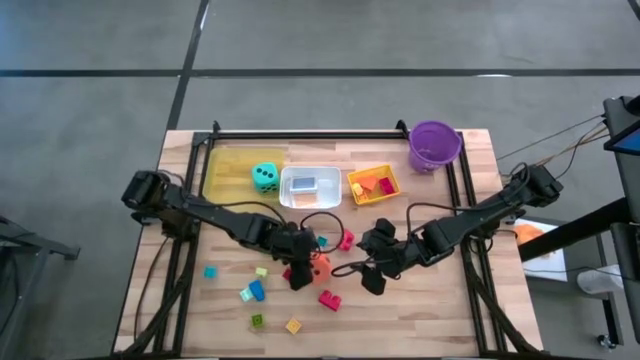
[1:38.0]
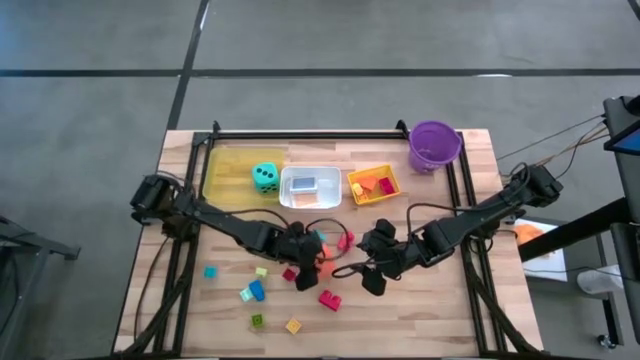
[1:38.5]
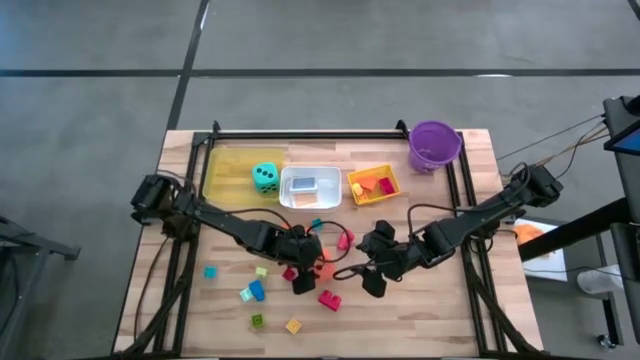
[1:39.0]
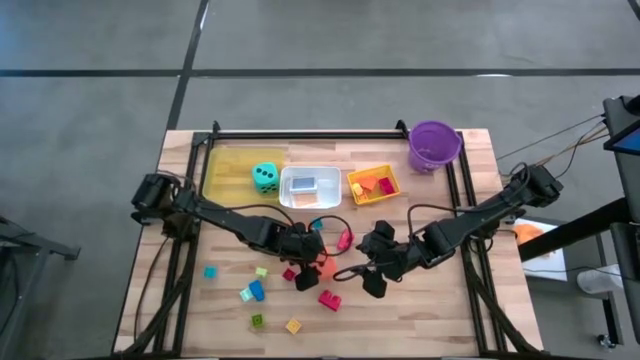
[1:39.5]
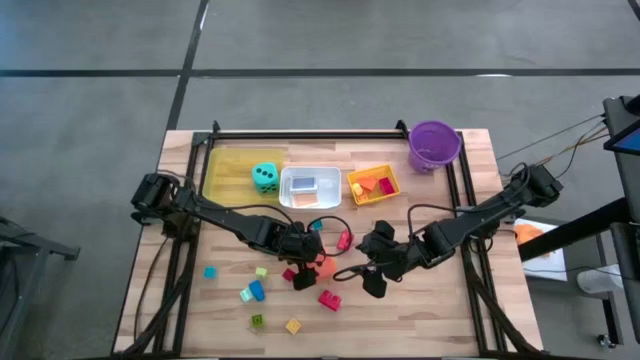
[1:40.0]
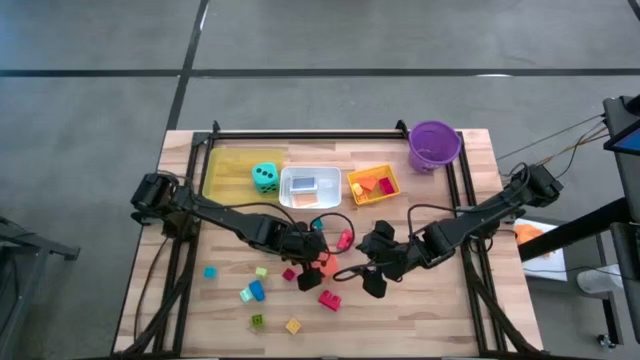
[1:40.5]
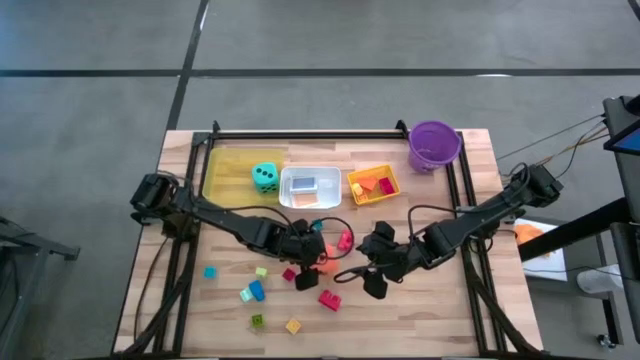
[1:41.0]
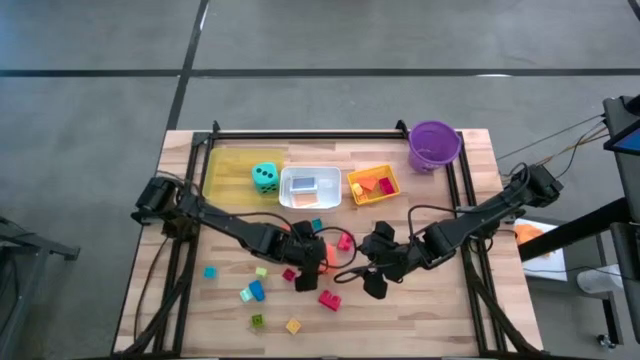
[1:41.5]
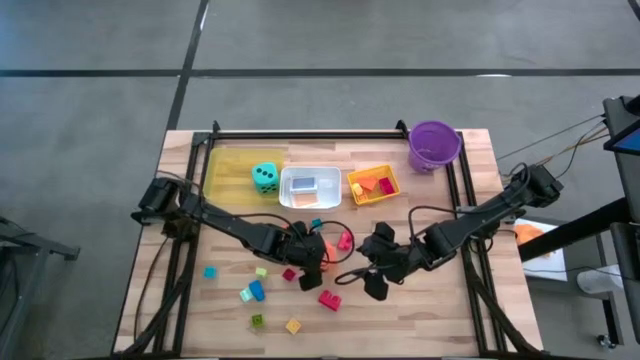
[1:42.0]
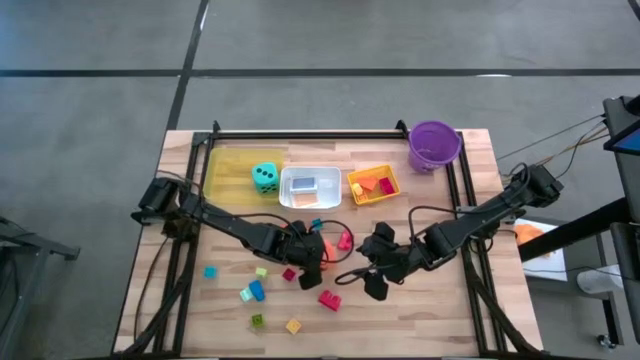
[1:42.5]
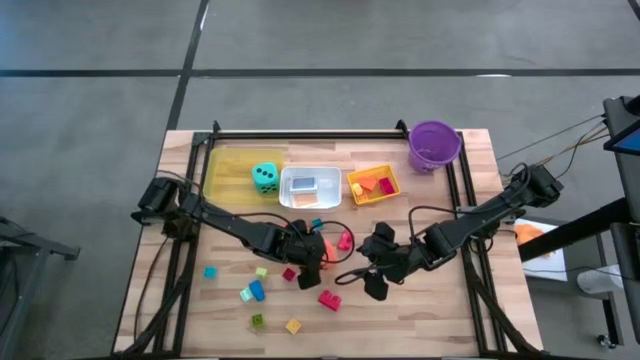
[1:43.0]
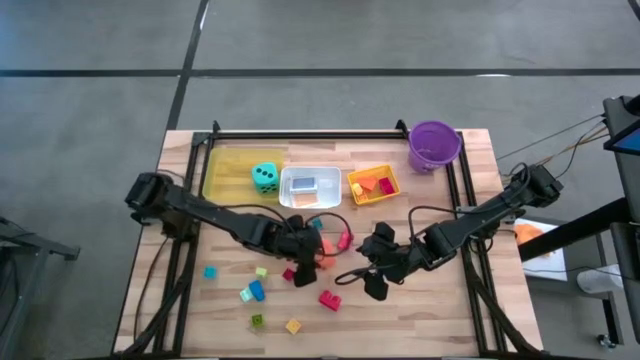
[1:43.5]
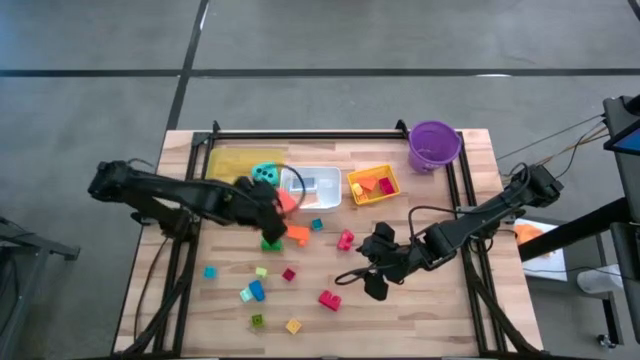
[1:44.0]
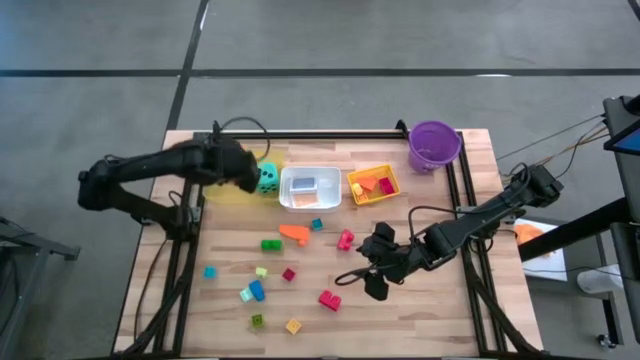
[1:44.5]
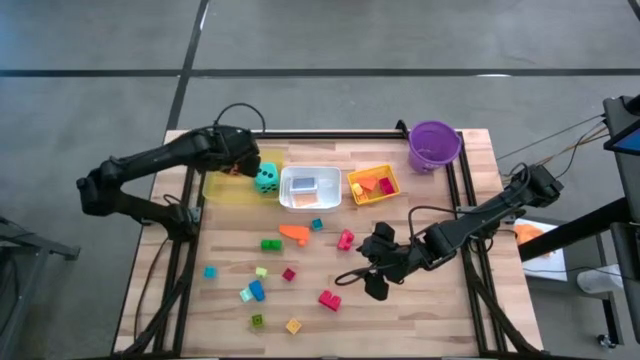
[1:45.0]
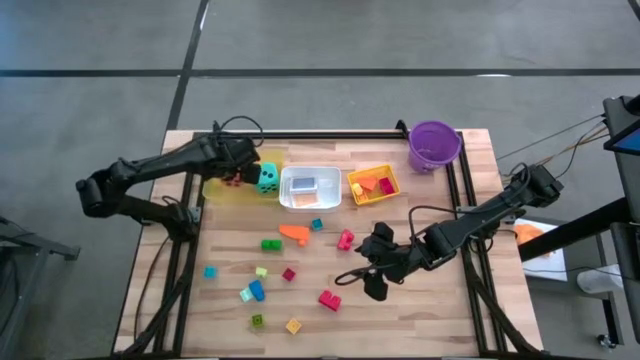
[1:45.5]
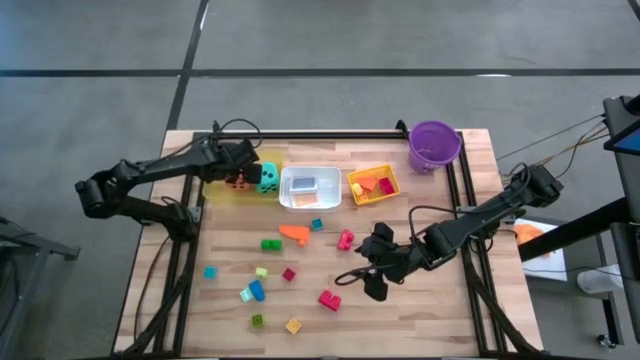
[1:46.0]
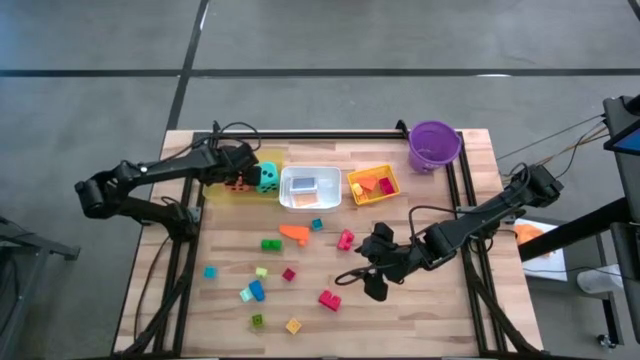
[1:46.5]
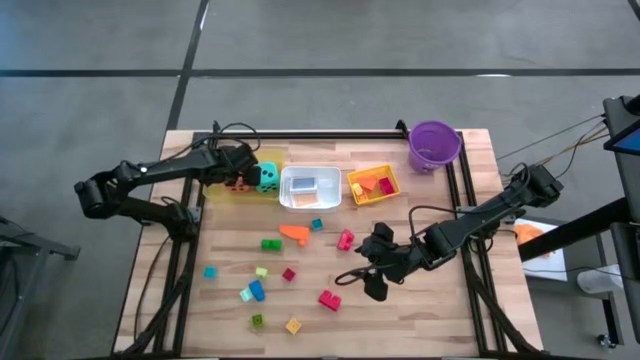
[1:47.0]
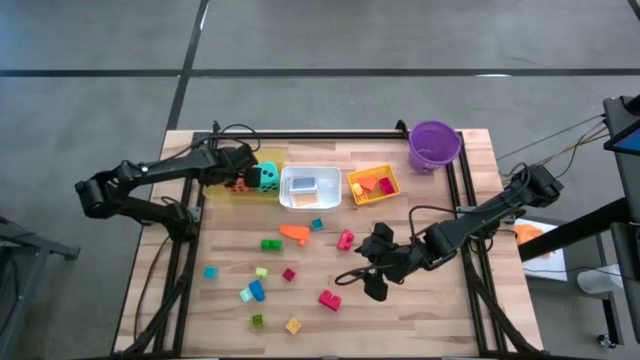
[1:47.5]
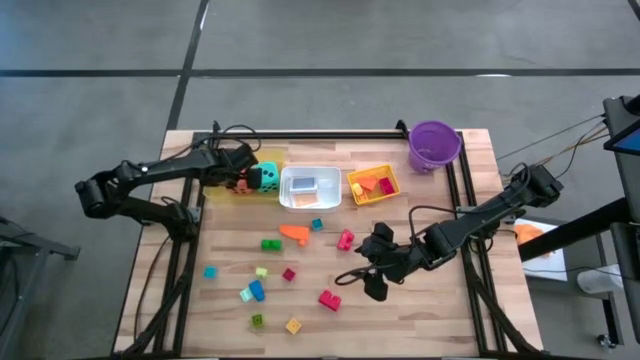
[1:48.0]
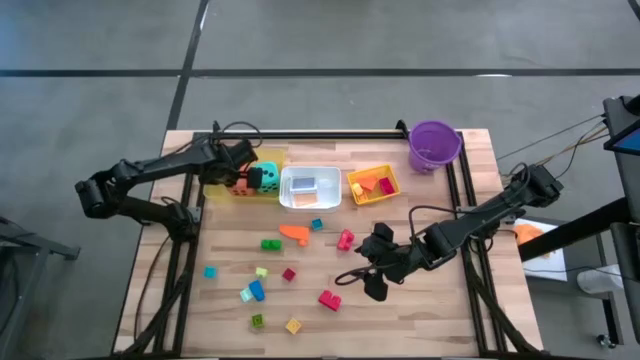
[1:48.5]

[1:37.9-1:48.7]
Task: Pick & Place Toys
Put the orange dice into the yellow transparent bin

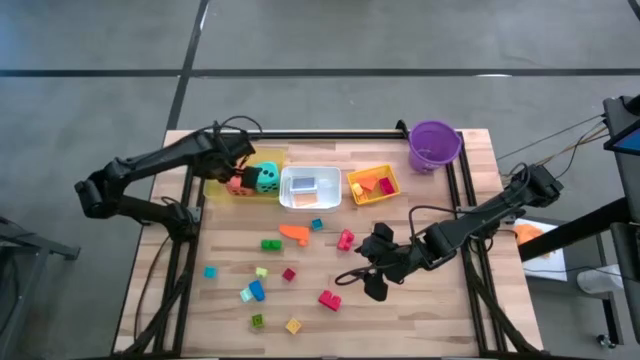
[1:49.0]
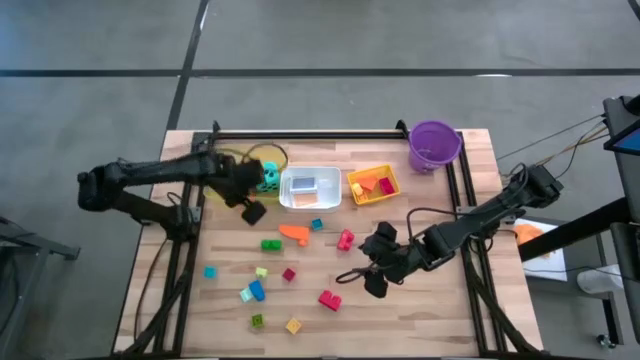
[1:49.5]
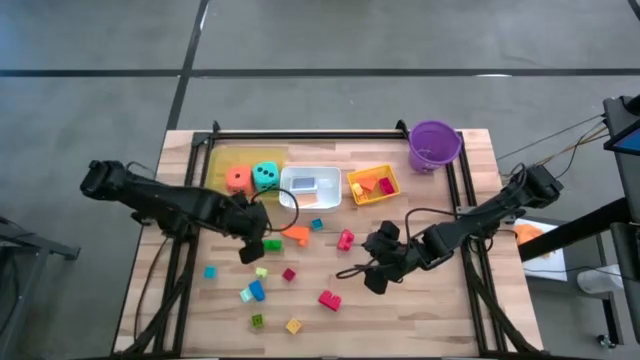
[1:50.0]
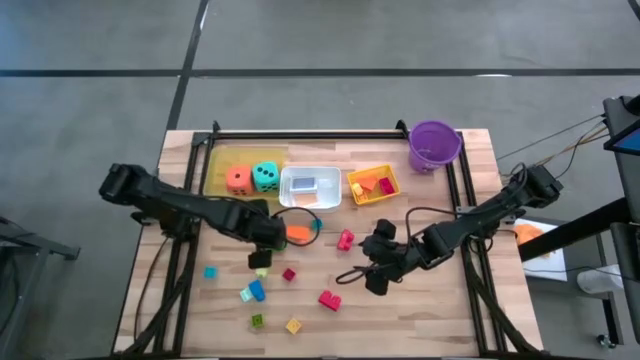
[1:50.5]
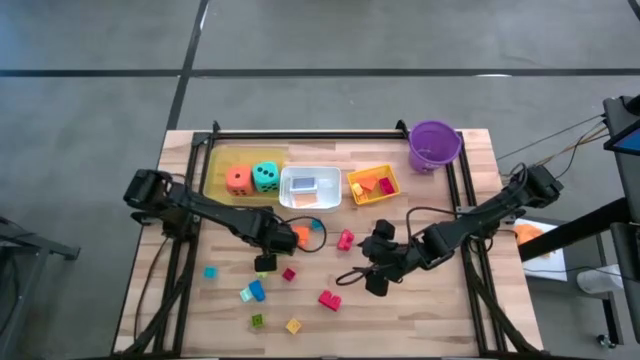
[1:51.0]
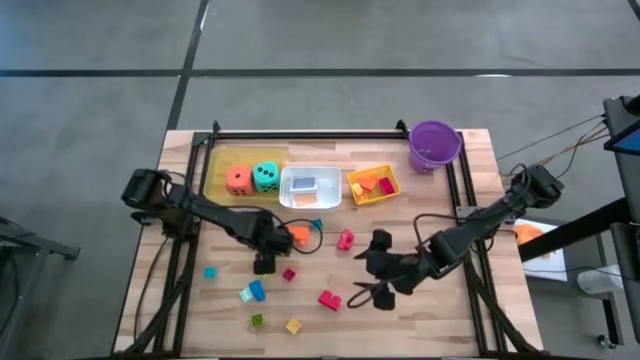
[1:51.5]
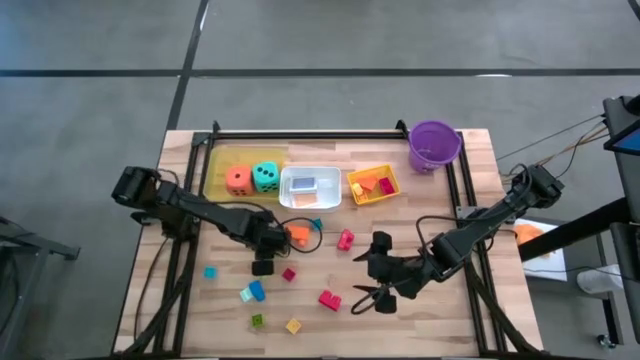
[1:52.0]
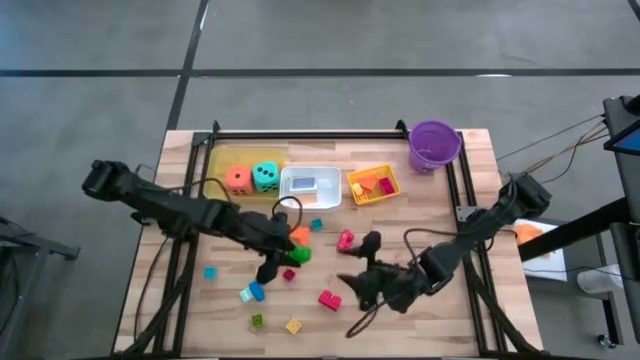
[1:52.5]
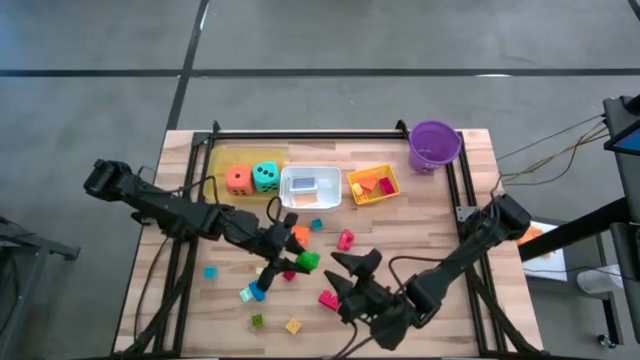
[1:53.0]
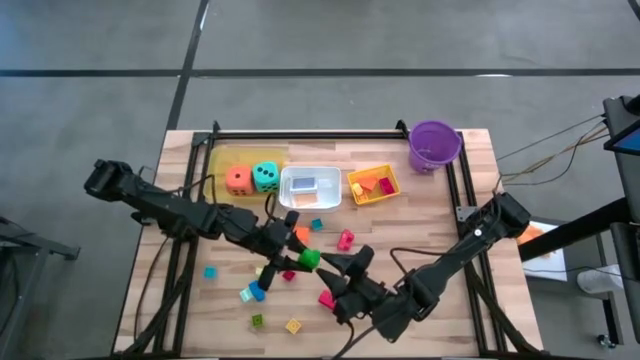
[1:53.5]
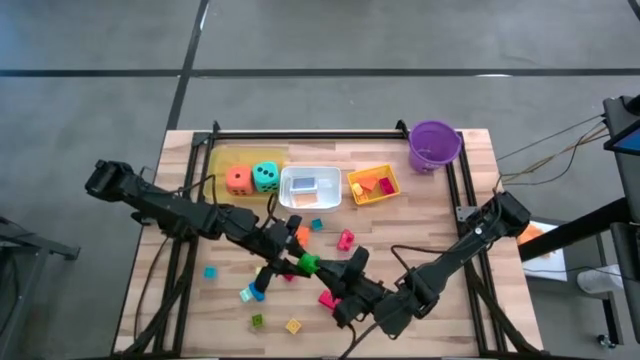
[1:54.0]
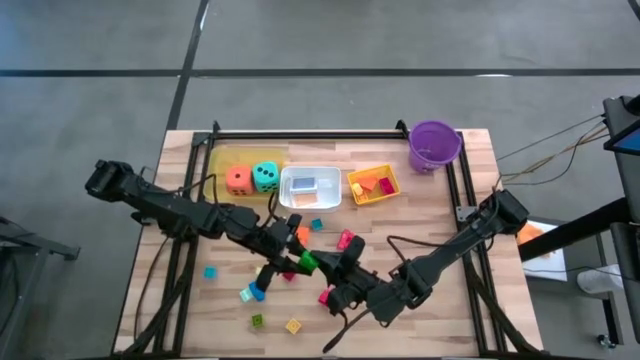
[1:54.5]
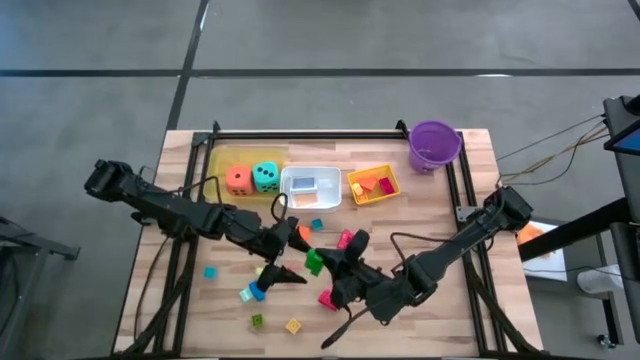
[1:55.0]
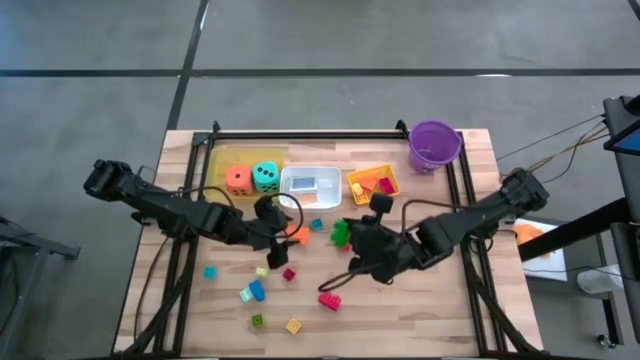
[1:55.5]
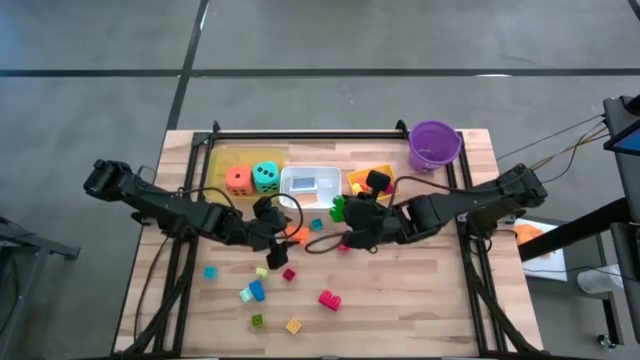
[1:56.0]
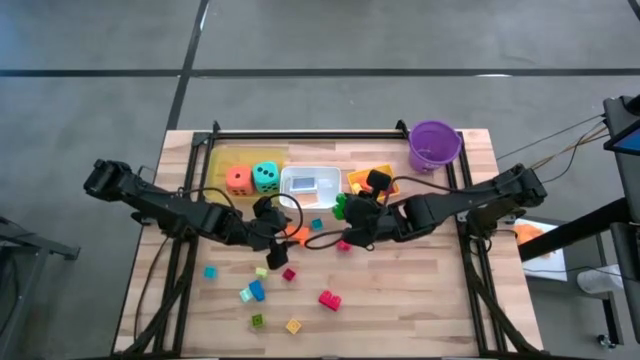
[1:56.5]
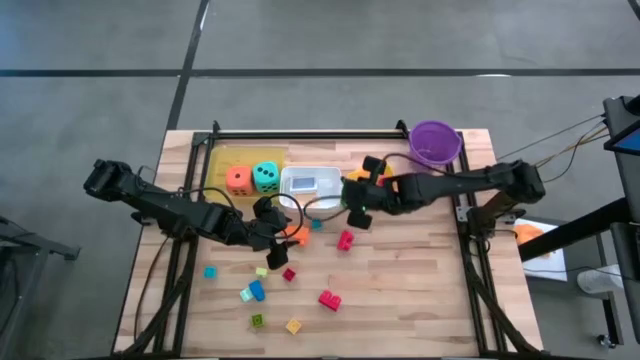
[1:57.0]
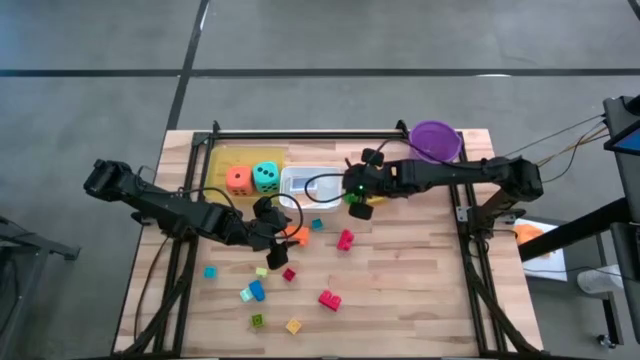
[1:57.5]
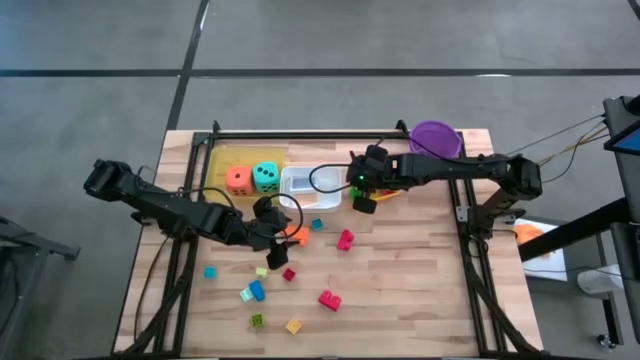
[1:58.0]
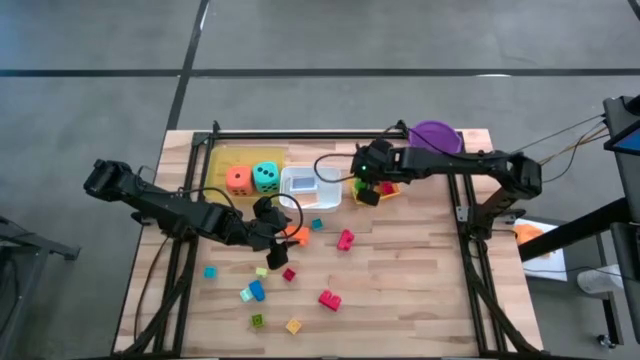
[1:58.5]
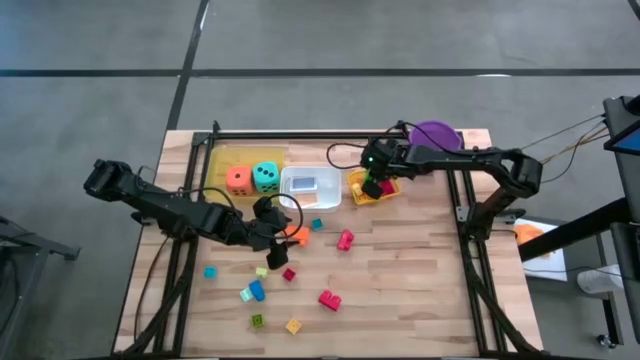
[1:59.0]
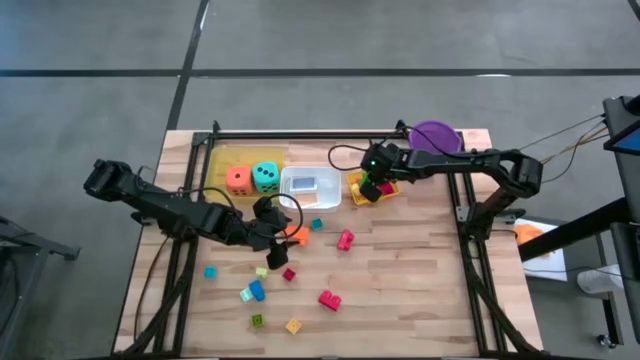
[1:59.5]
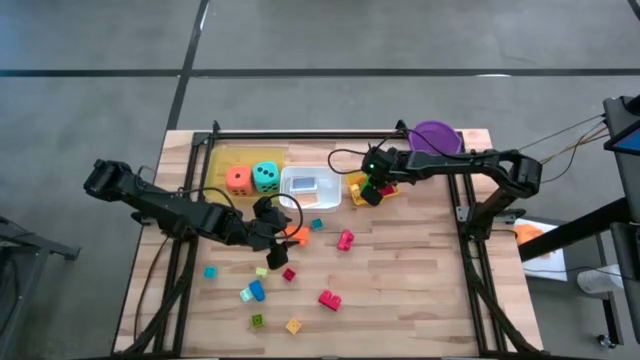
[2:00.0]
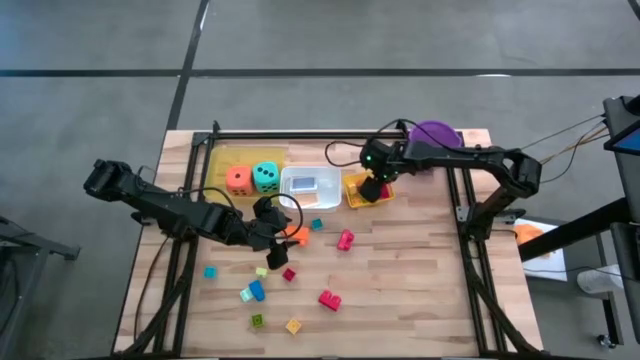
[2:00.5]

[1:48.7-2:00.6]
Put the green game piece into the yellow bin
